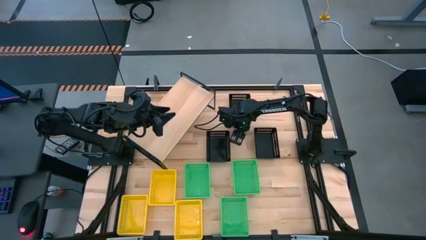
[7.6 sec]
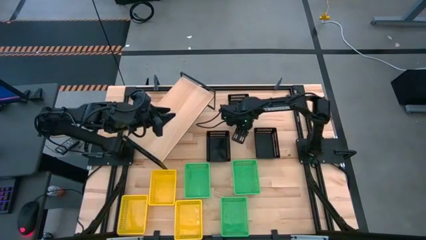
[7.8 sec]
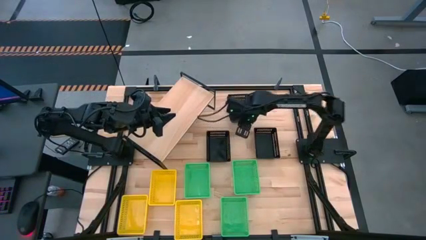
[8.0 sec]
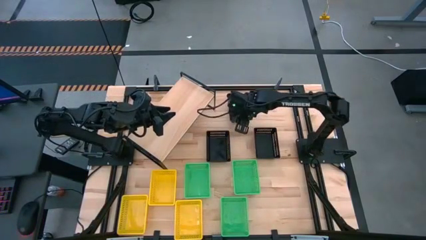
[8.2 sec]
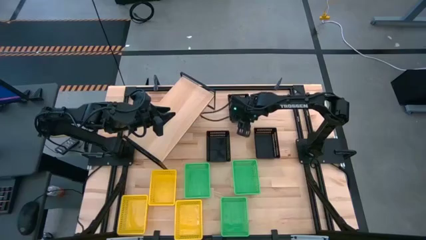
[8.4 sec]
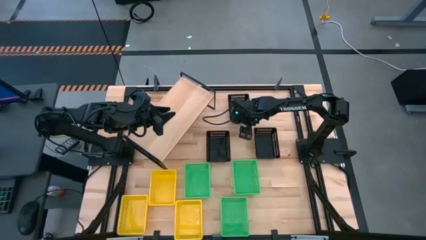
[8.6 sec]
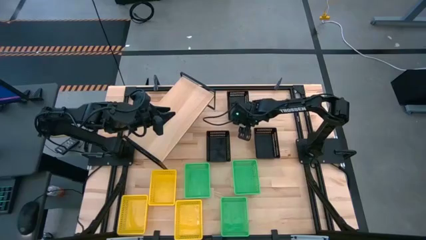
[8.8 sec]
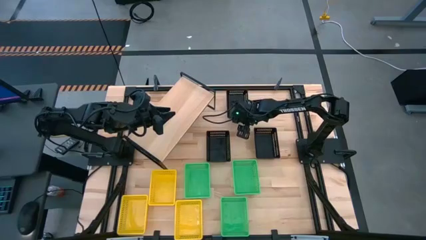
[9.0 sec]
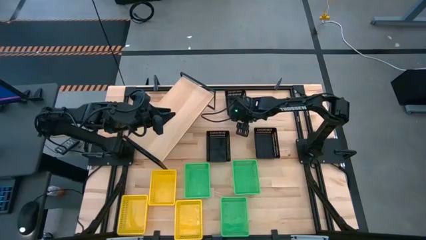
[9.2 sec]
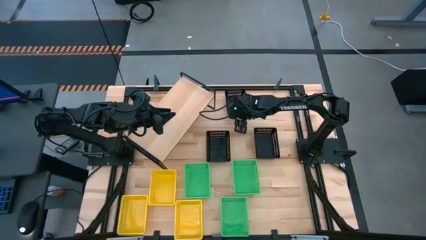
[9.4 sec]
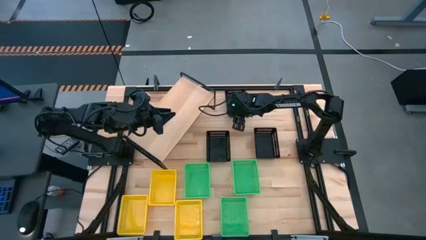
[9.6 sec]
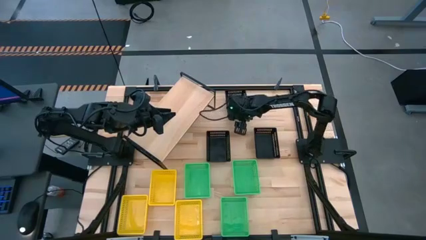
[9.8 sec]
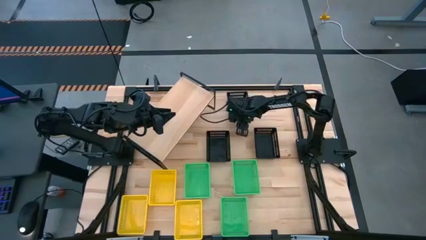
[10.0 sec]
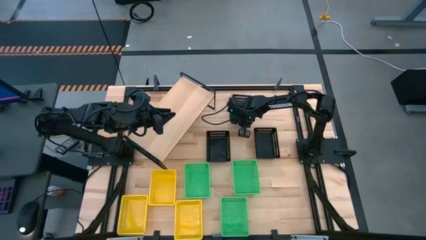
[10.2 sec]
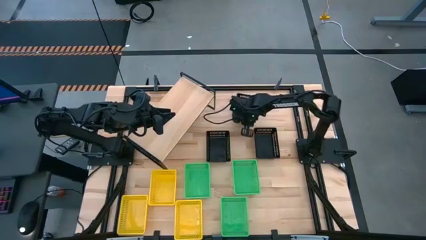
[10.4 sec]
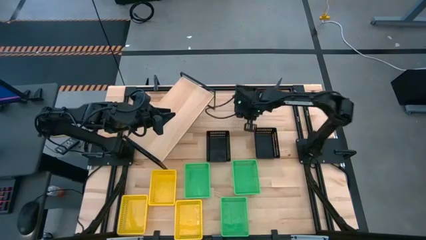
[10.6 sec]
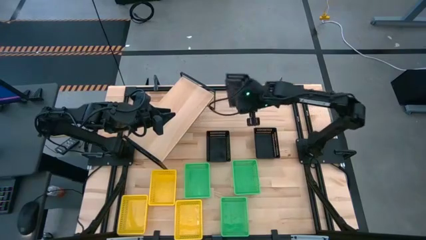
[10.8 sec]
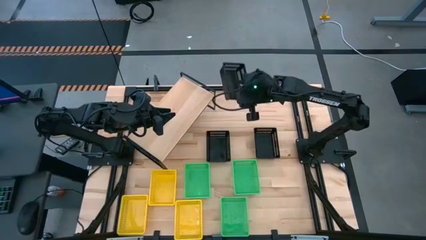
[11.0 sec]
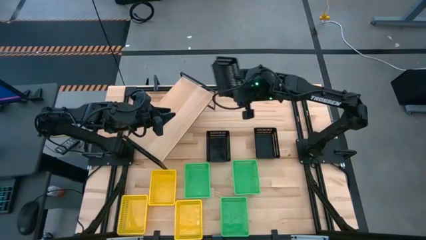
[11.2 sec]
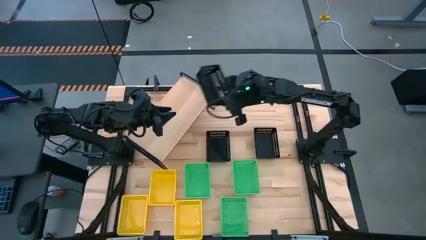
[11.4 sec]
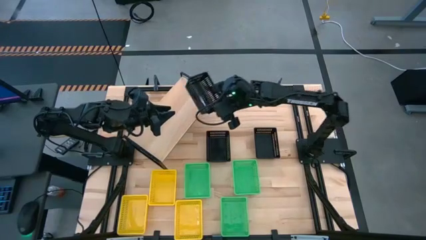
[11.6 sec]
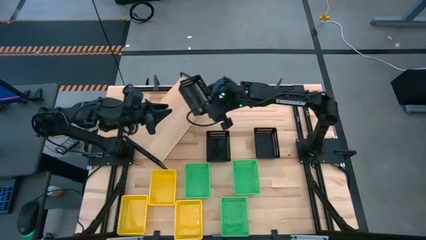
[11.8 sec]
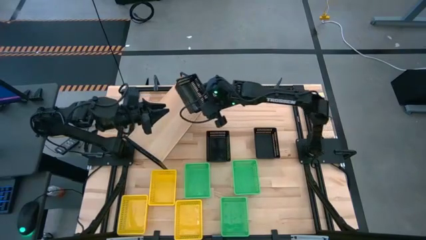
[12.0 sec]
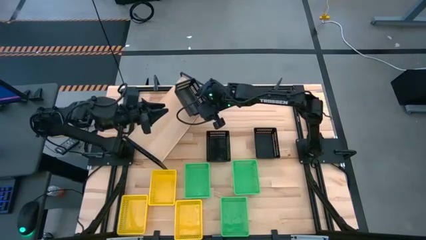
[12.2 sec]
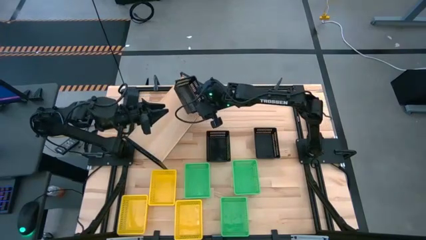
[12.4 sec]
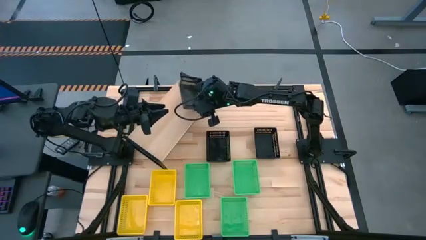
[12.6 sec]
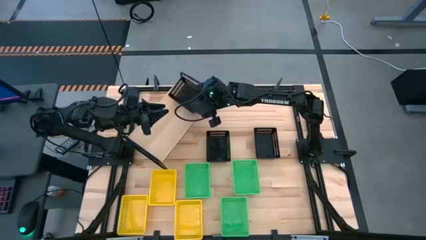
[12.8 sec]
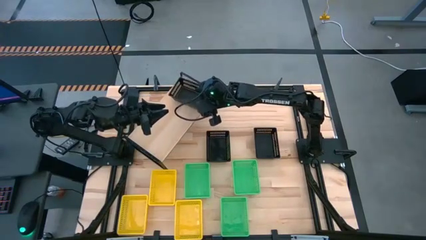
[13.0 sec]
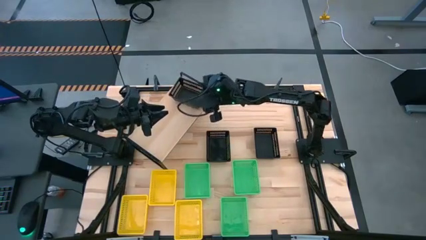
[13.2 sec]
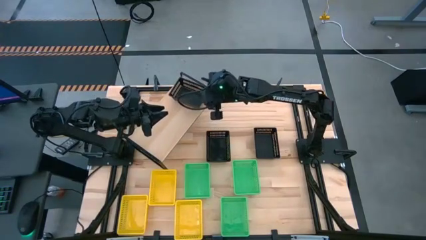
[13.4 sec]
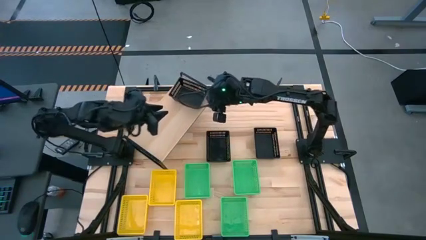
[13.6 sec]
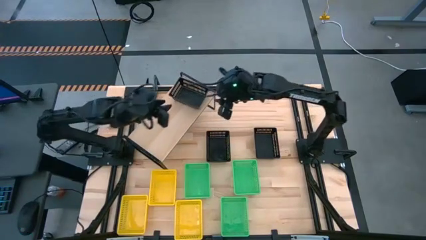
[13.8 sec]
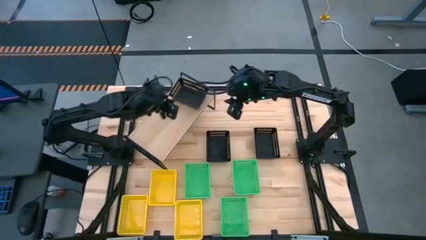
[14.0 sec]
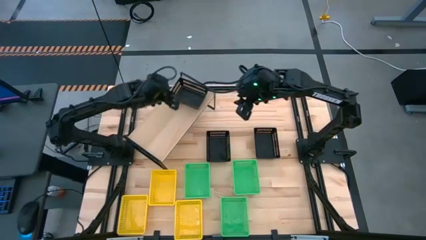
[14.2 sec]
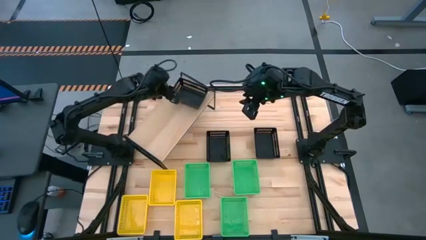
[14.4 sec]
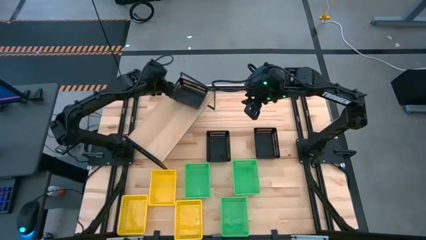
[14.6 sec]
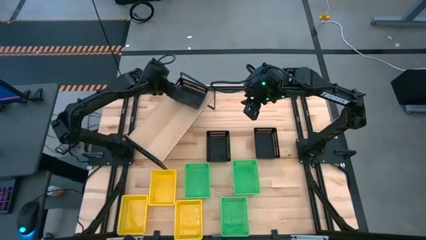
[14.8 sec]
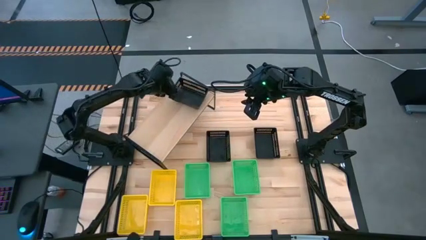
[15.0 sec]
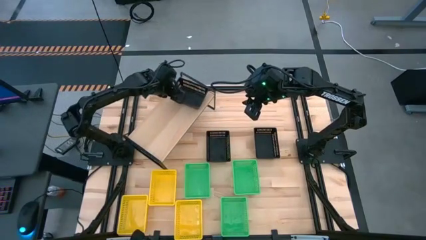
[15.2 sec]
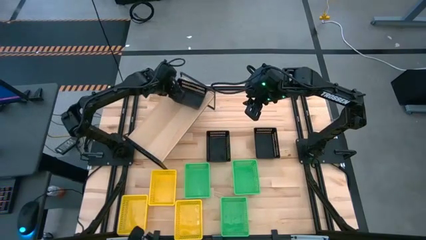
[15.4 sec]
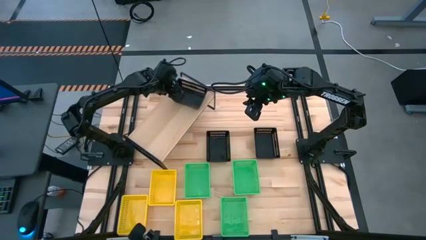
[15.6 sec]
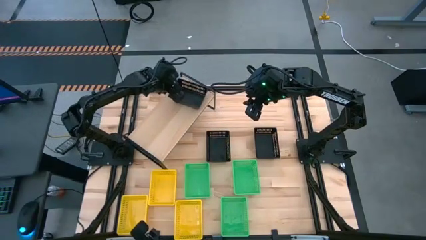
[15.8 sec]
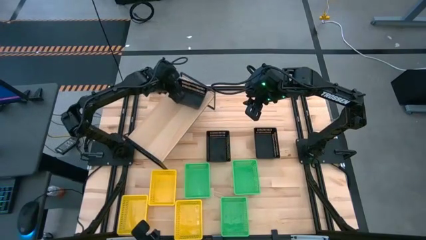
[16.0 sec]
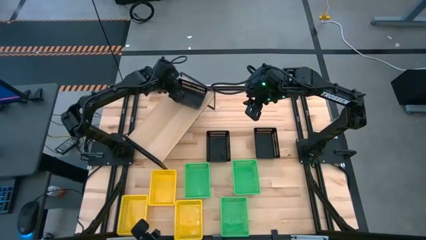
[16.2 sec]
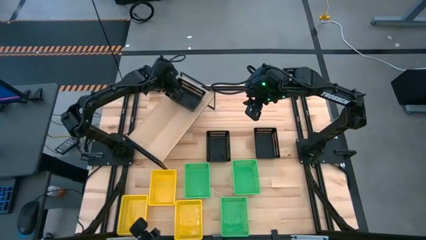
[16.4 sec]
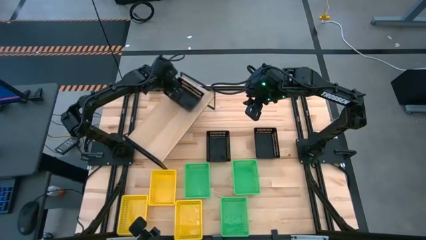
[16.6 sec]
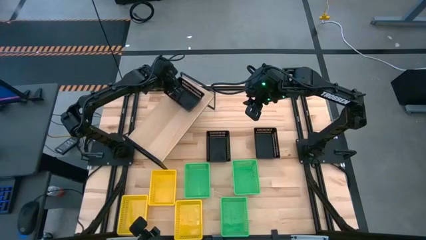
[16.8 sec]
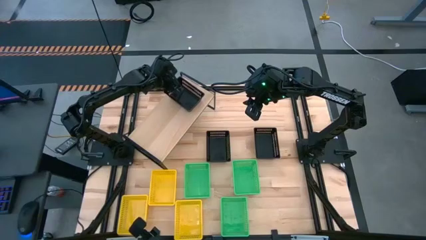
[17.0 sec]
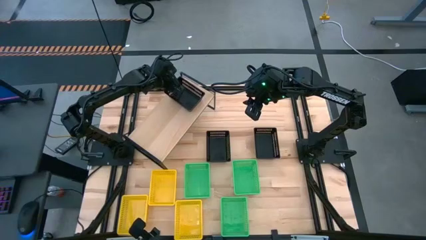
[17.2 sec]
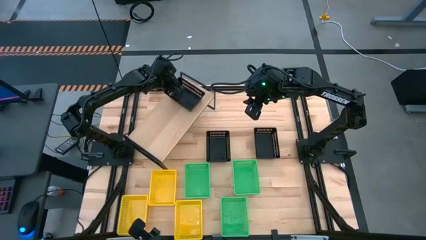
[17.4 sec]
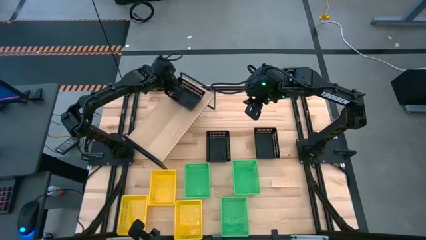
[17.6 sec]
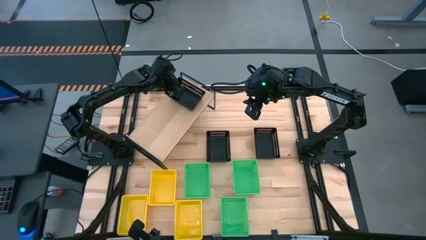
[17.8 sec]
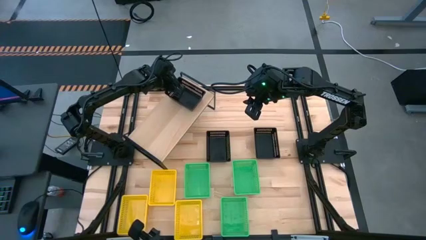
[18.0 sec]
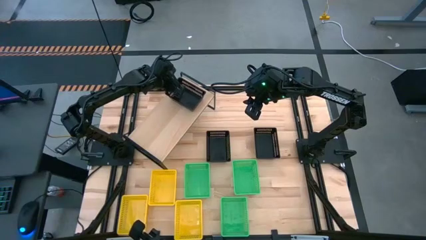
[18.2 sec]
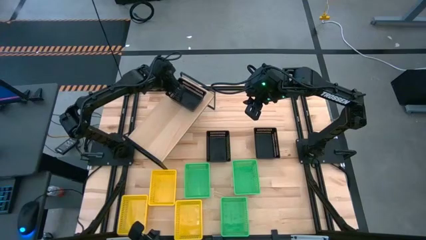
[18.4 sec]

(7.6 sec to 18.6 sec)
Task: Stack baskets on shelf by color
Put the top black bin on the shelf
